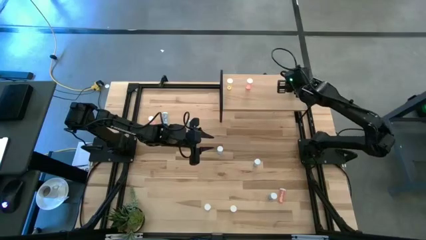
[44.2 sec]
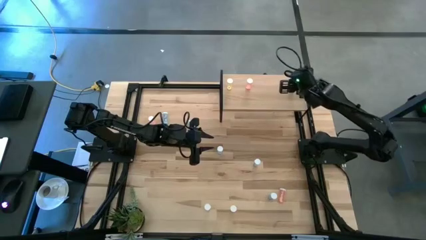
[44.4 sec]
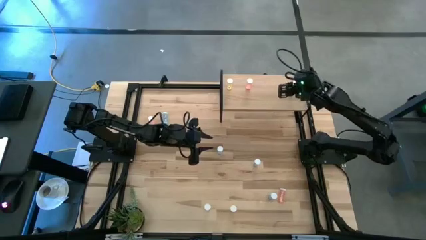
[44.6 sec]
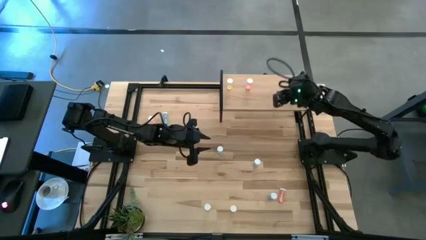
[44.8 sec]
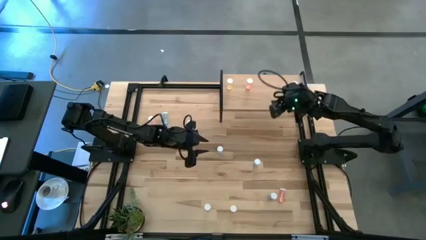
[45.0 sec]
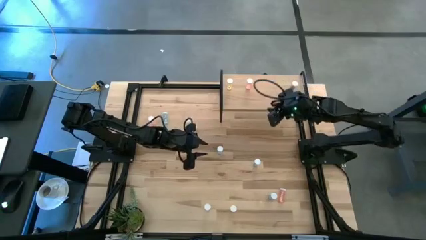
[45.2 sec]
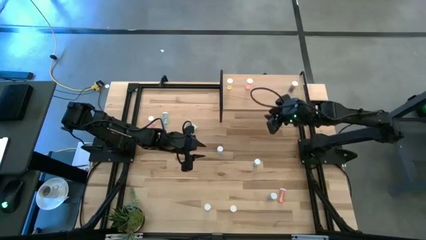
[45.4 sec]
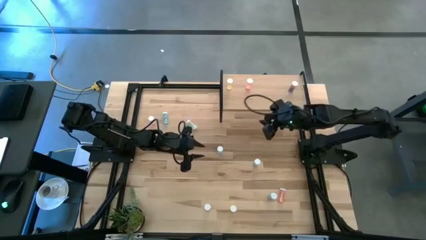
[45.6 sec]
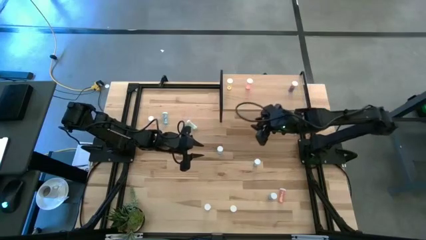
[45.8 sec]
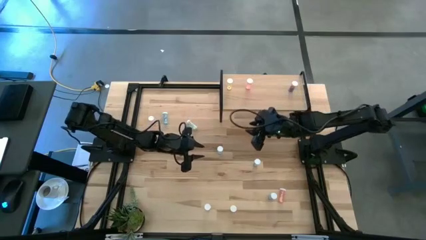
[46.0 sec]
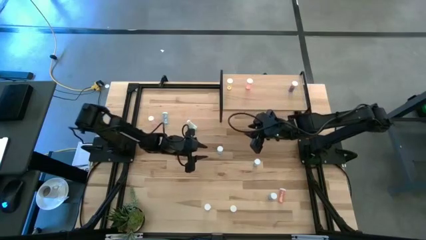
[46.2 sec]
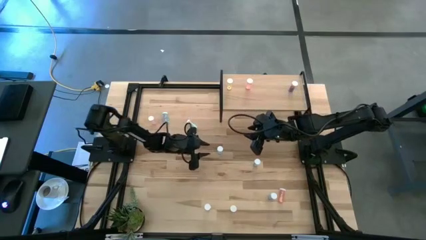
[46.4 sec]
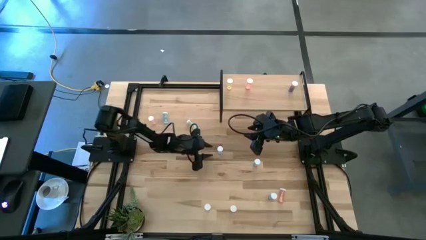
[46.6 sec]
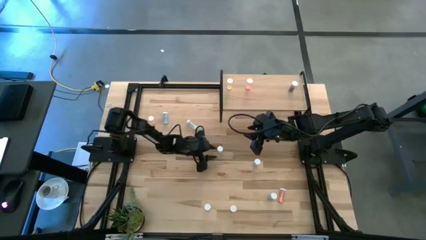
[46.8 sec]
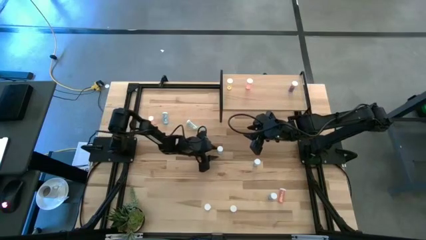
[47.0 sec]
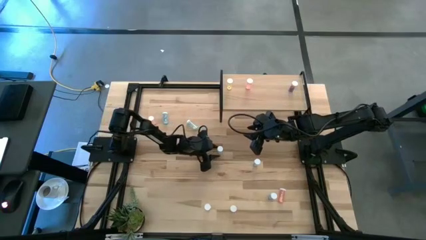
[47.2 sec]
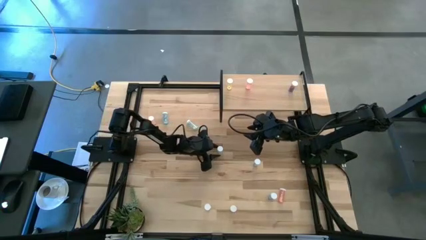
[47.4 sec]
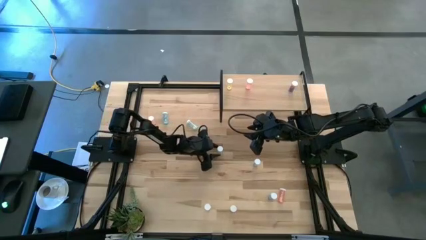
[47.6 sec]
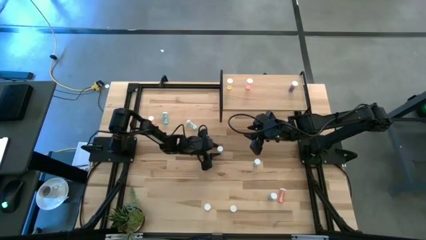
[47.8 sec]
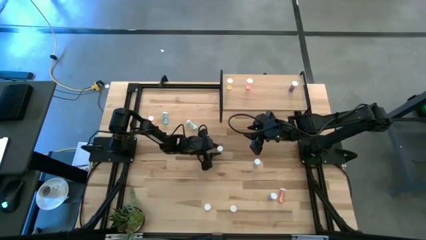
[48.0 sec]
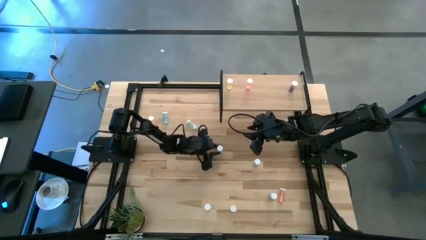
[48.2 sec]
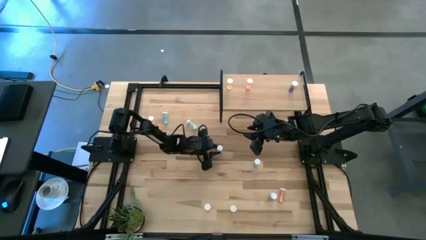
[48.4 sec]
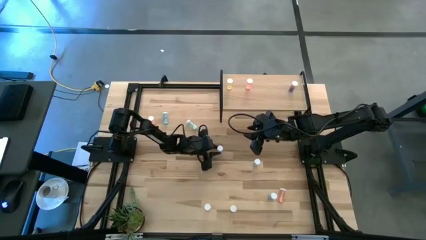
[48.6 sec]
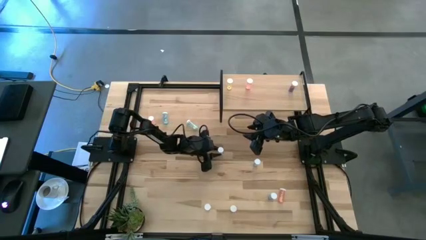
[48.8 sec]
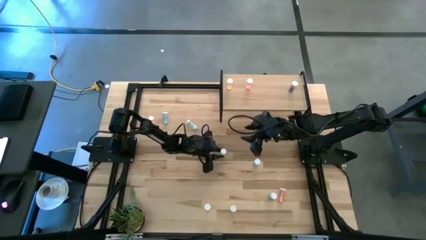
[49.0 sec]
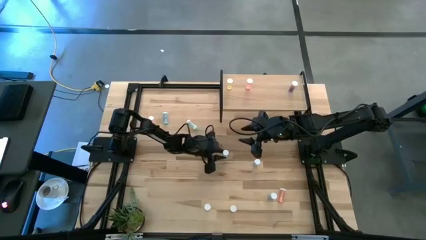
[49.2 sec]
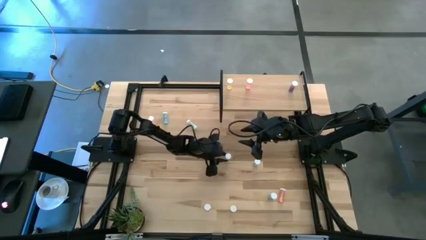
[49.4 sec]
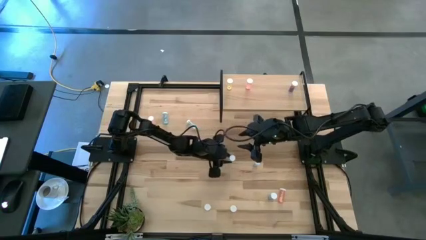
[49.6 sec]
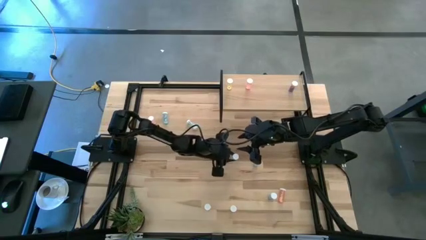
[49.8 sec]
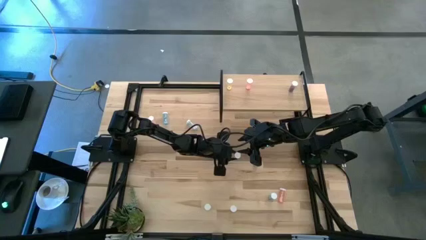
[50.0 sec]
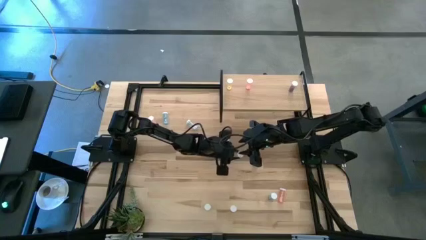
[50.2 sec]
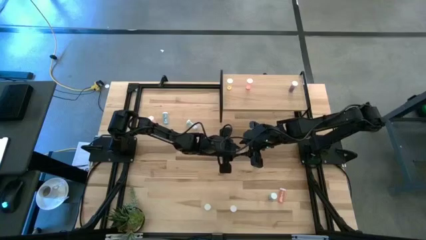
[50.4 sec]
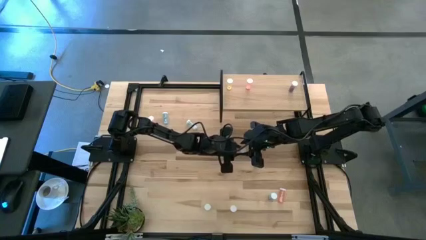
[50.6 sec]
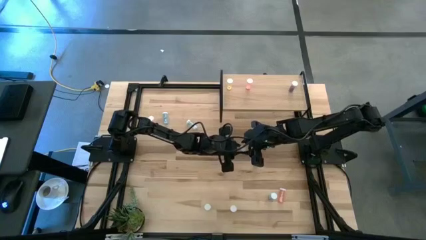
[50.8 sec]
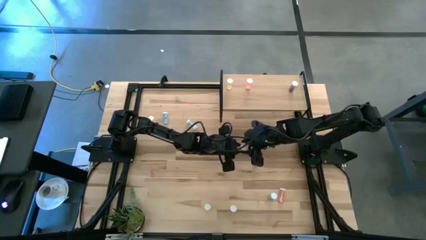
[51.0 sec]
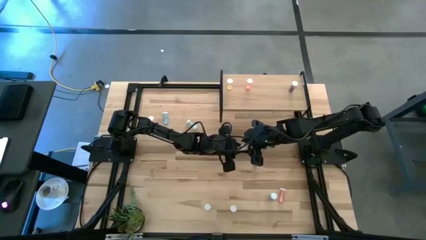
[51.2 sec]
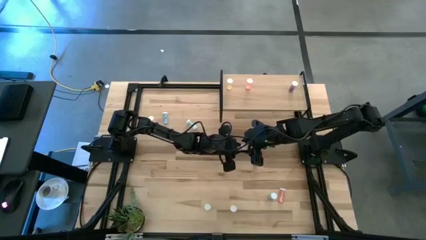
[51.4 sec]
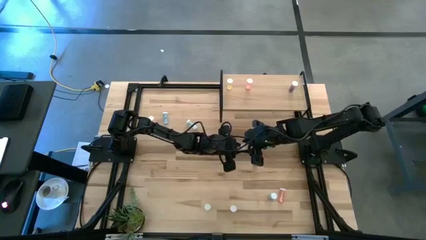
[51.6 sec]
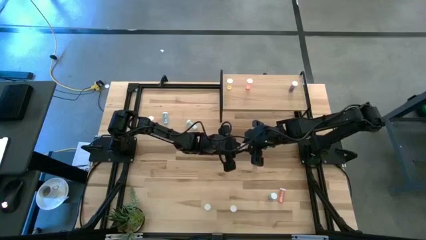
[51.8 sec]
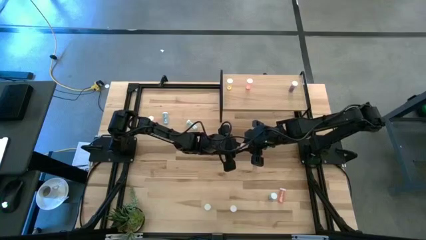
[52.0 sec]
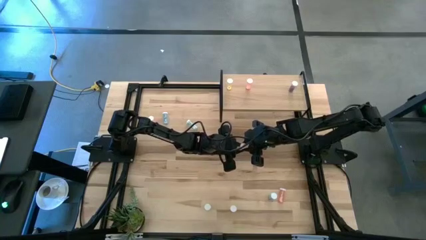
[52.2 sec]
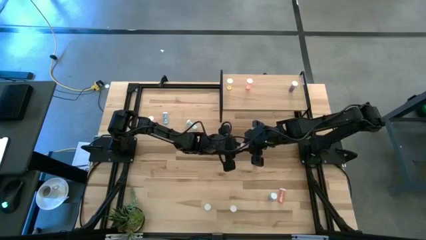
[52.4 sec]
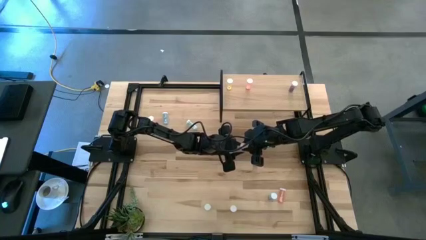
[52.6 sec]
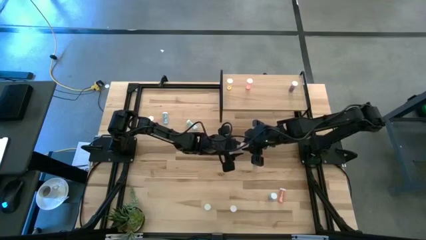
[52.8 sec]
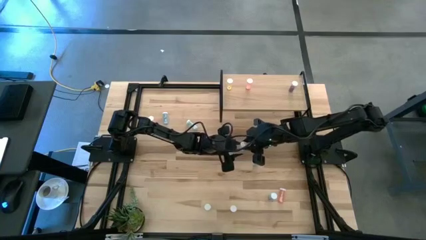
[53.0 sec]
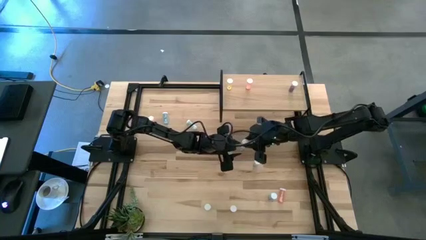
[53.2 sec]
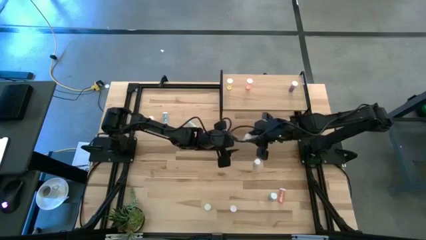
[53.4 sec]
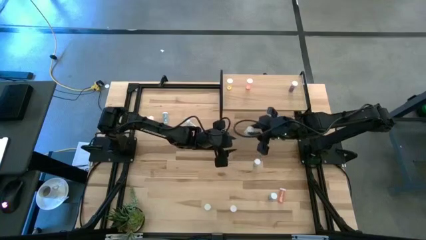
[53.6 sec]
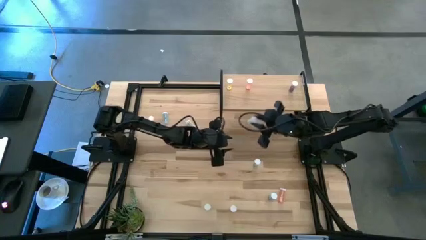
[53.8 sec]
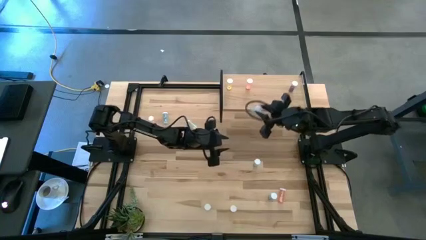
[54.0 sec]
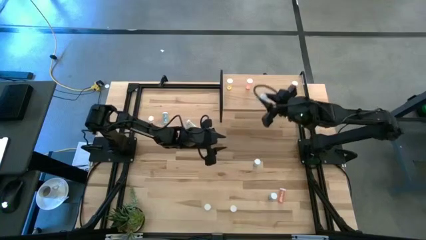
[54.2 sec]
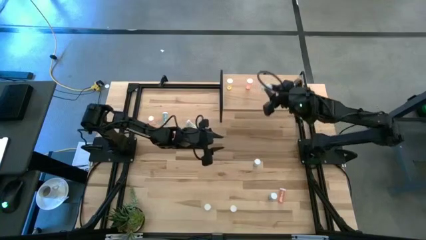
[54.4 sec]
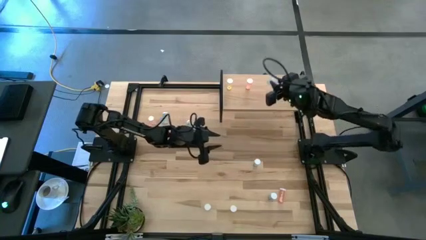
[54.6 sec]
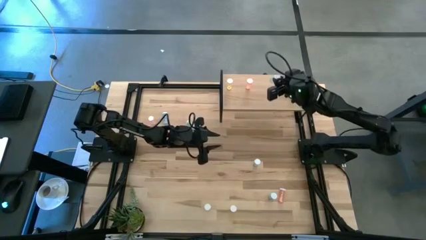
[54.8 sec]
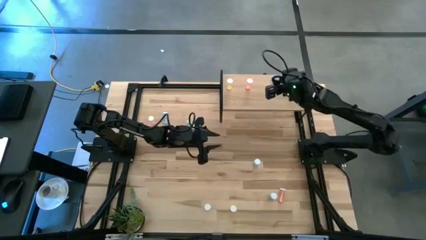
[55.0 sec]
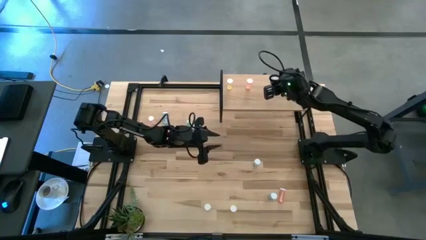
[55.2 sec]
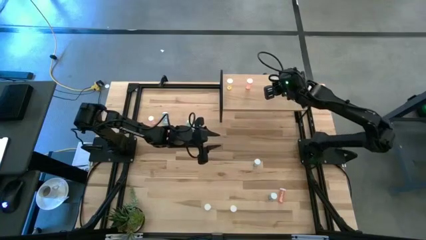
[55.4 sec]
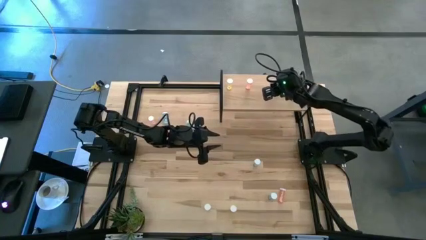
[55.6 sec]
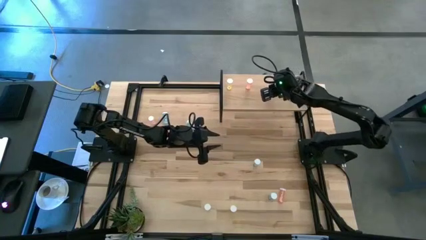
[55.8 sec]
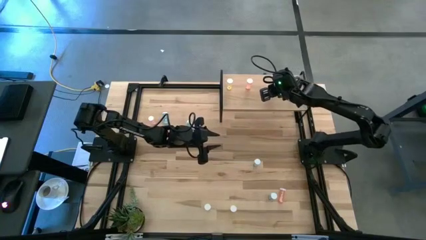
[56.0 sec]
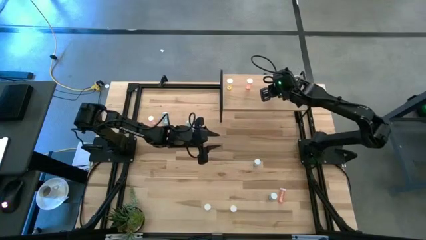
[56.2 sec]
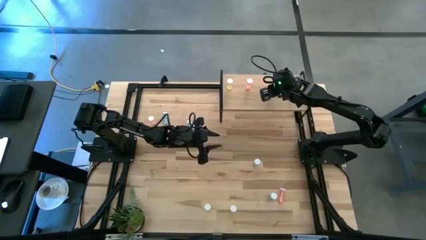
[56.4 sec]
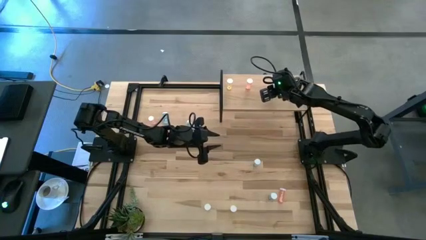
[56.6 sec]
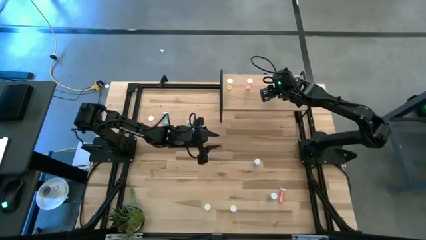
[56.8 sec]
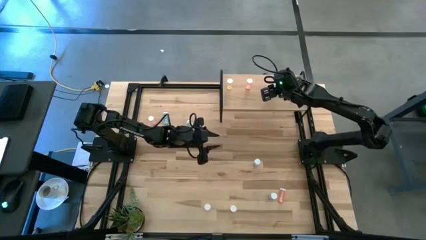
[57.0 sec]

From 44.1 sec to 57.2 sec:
Task: Pick and place medicine bottles onto shelf by color
Put the center green pill bottle on the shelf

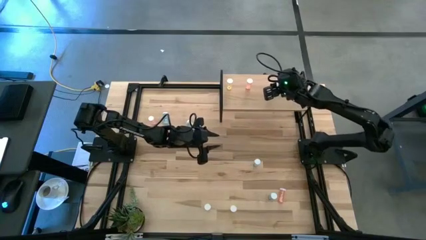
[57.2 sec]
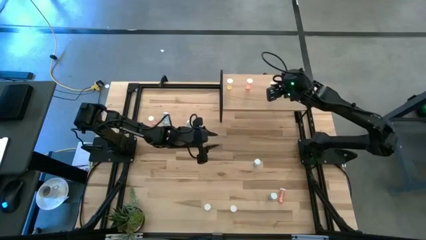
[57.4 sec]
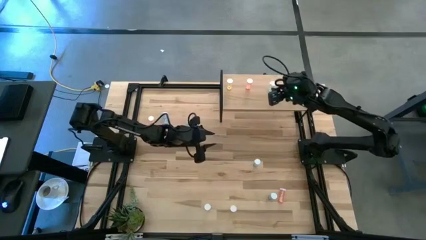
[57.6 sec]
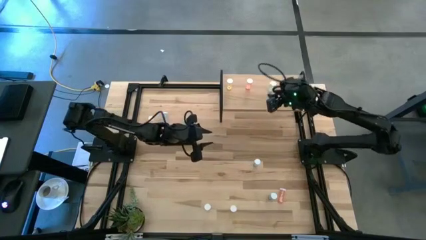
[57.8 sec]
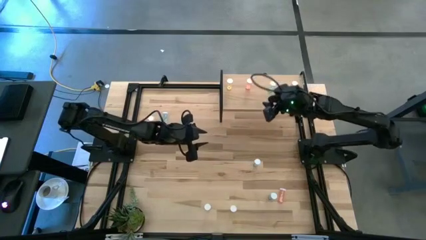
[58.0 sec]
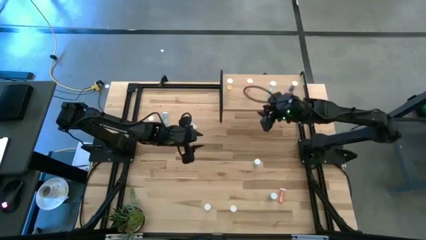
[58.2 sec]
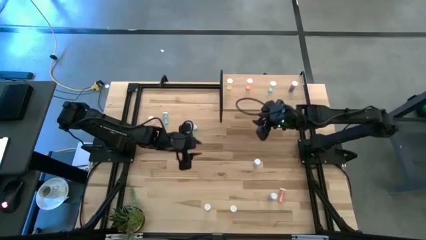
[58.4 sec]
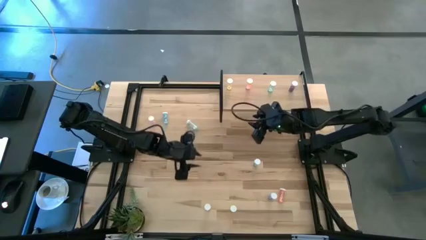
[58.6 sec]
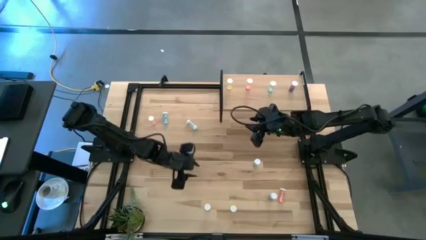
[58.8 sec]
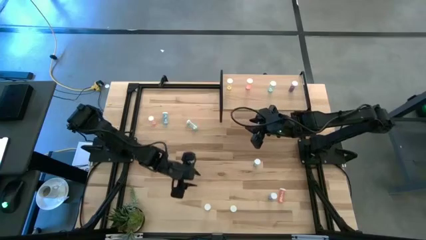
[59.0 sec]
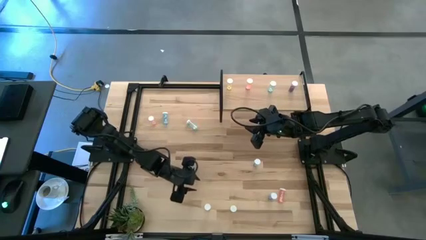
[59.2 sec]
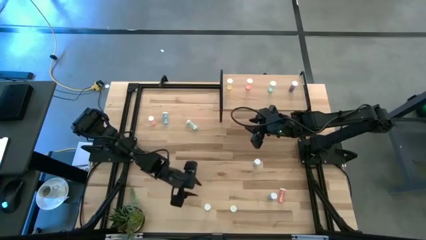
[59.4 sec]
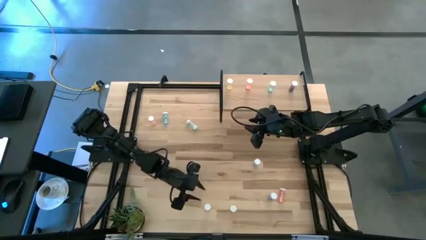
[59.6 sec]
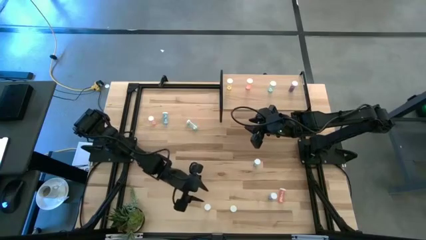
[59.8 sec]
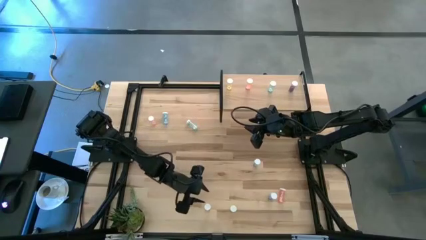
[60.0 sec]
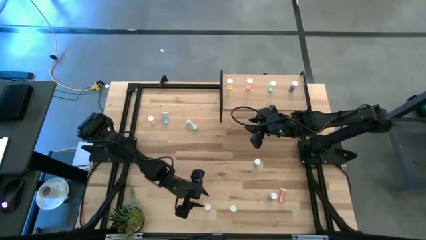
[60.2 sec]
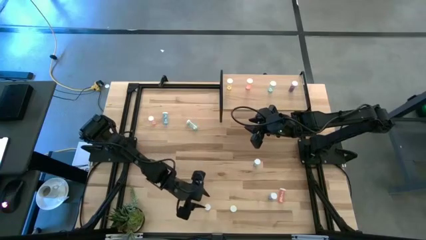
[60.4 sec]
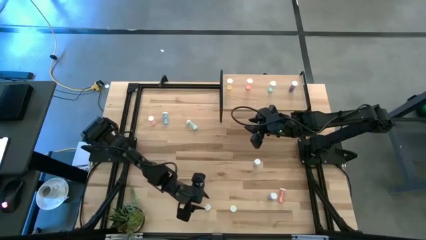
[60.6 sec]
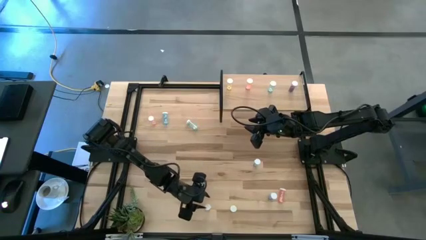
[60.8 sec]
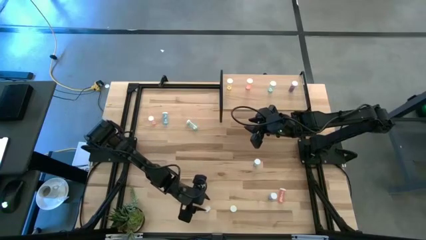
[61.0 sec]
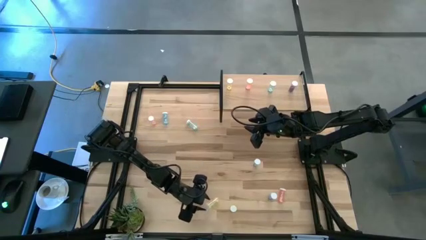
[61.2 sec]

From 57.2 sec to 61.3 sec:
Put the left yellow pill bottle on the shelf
